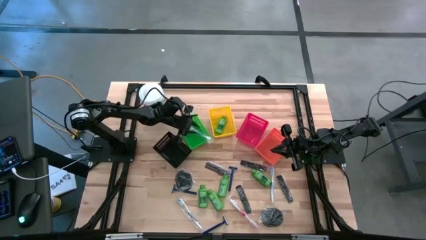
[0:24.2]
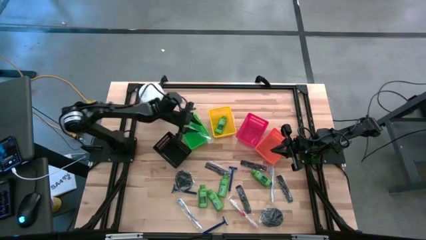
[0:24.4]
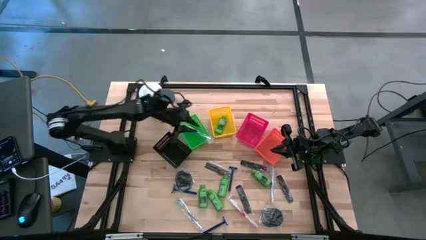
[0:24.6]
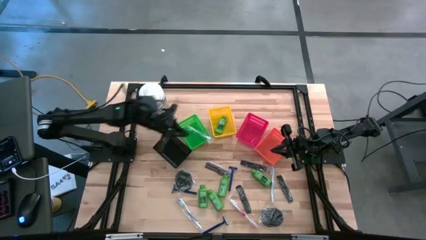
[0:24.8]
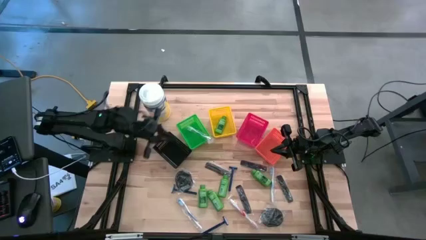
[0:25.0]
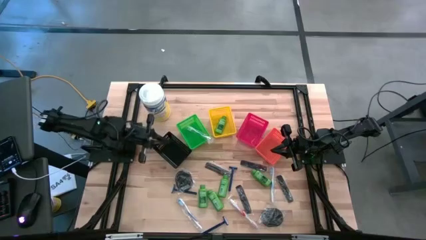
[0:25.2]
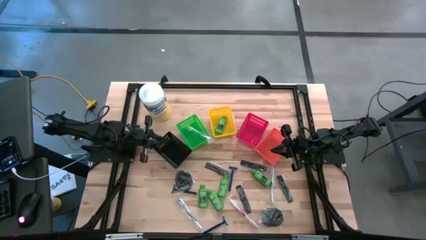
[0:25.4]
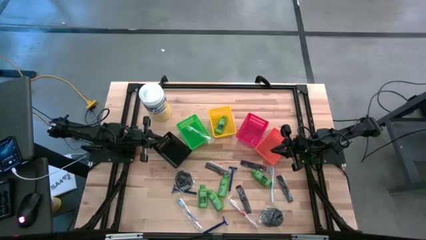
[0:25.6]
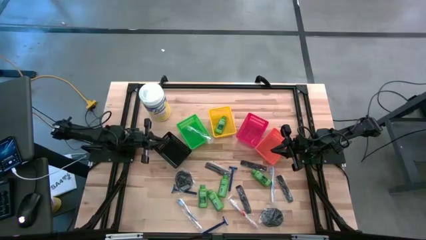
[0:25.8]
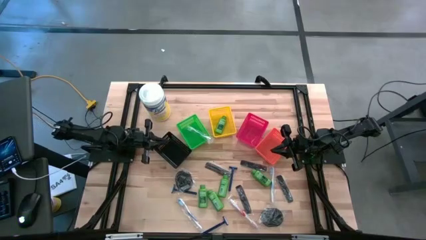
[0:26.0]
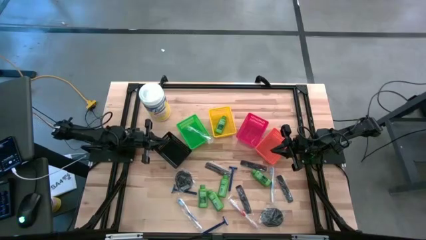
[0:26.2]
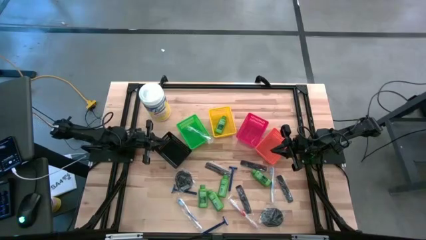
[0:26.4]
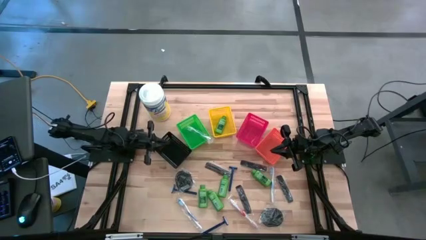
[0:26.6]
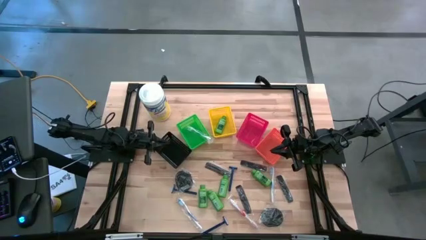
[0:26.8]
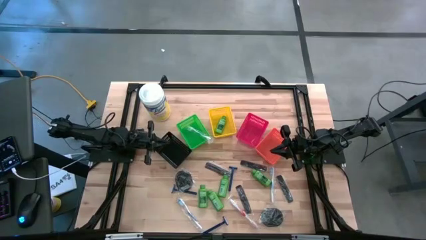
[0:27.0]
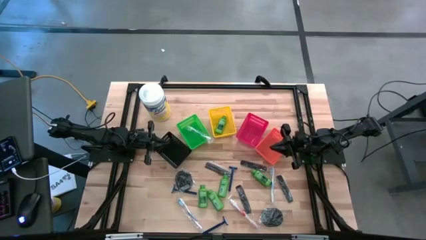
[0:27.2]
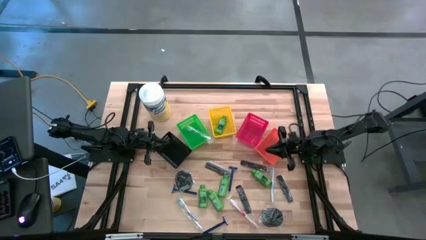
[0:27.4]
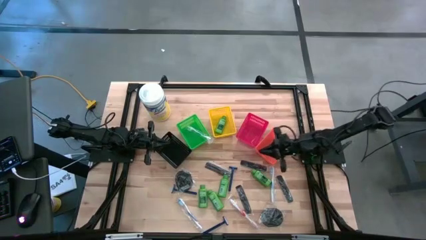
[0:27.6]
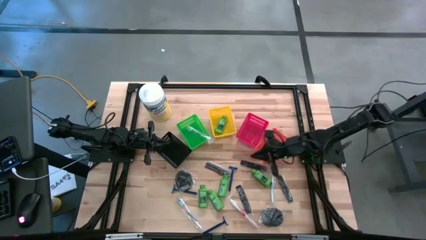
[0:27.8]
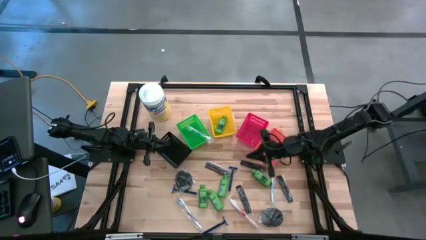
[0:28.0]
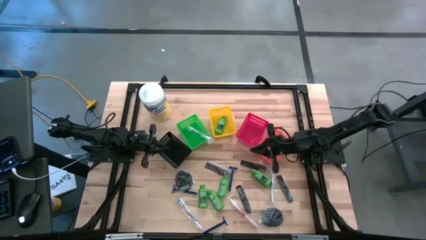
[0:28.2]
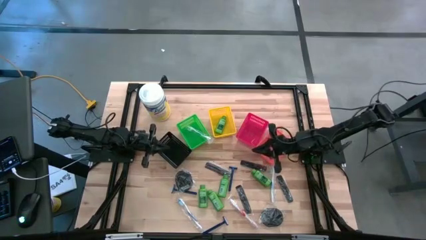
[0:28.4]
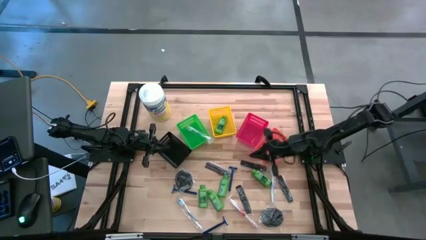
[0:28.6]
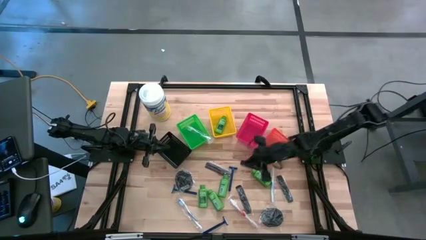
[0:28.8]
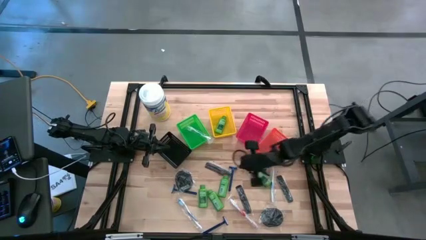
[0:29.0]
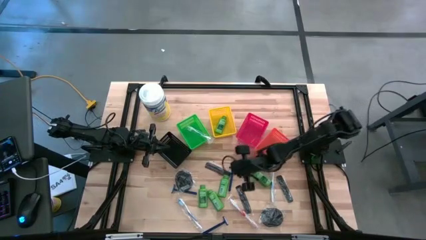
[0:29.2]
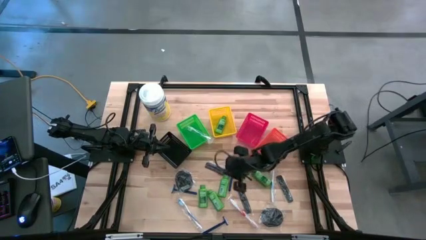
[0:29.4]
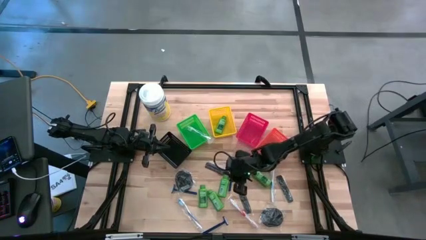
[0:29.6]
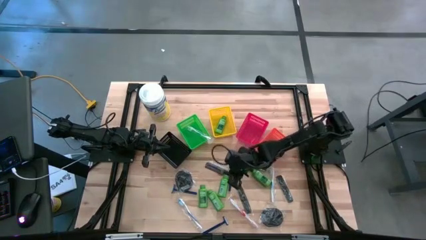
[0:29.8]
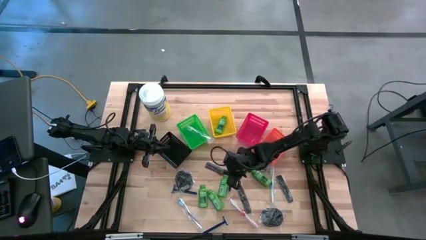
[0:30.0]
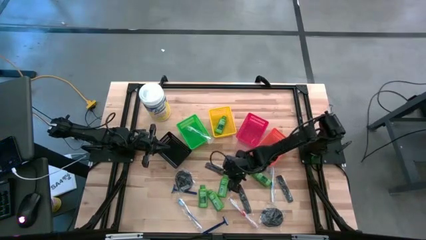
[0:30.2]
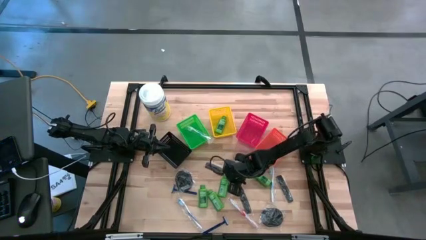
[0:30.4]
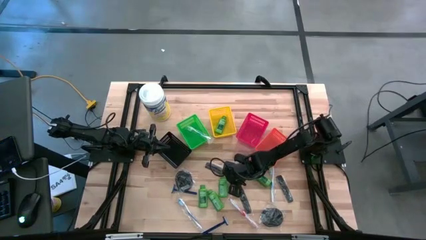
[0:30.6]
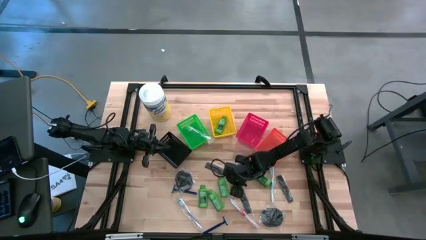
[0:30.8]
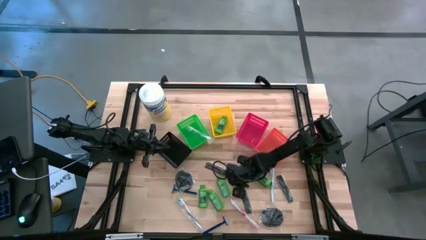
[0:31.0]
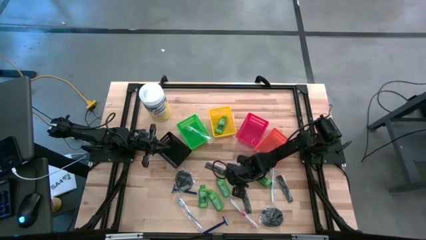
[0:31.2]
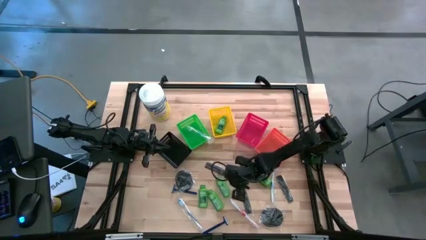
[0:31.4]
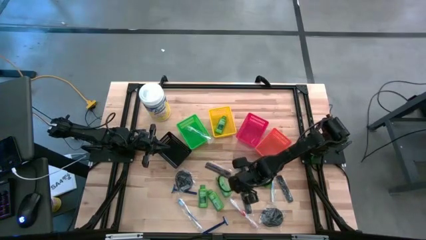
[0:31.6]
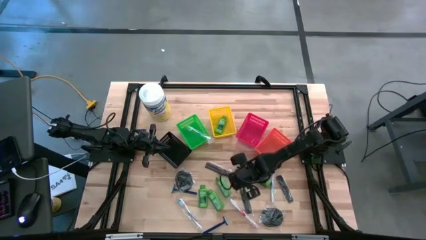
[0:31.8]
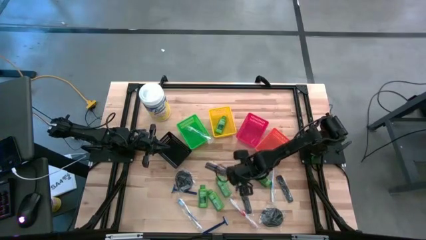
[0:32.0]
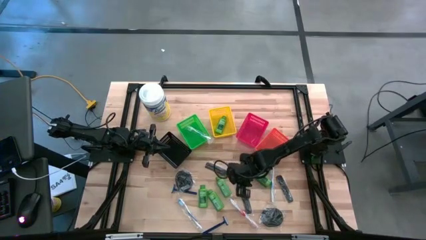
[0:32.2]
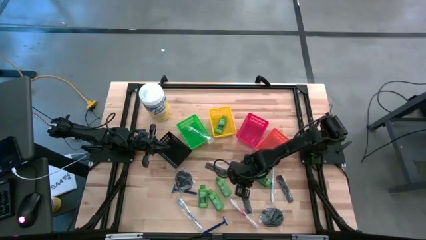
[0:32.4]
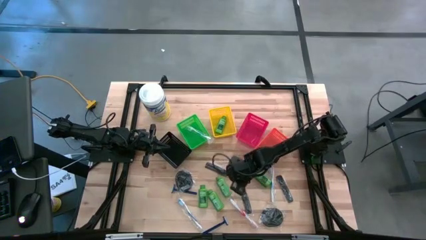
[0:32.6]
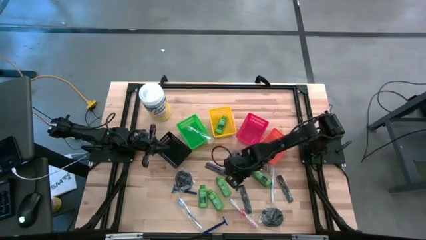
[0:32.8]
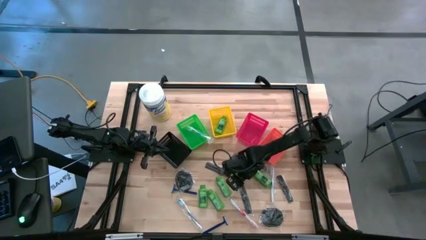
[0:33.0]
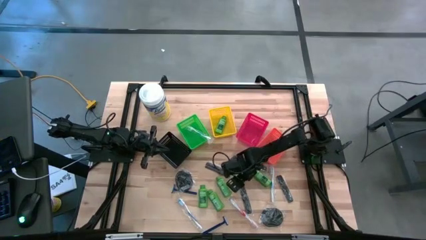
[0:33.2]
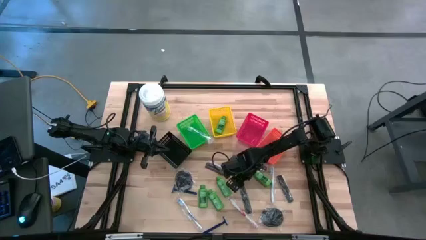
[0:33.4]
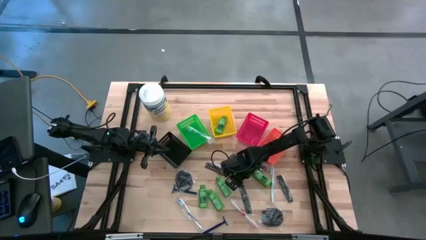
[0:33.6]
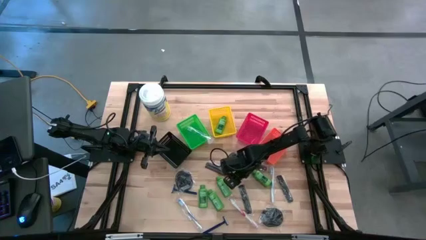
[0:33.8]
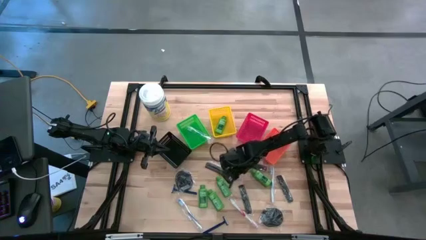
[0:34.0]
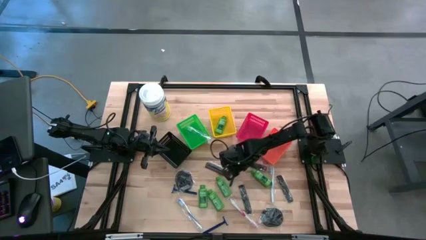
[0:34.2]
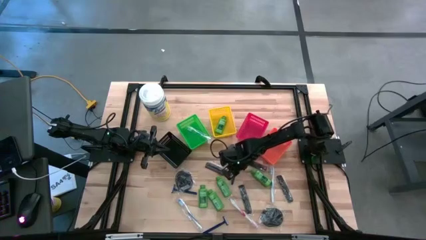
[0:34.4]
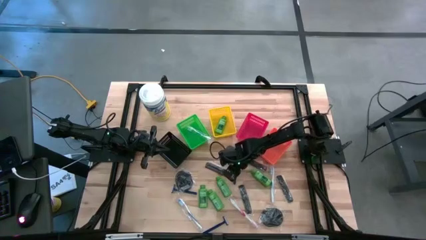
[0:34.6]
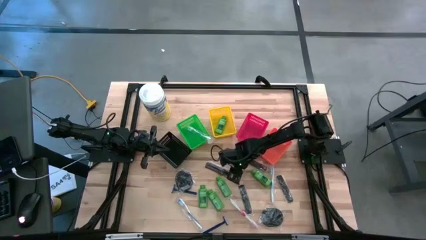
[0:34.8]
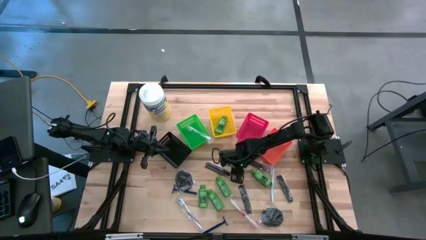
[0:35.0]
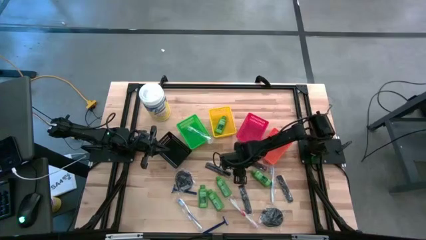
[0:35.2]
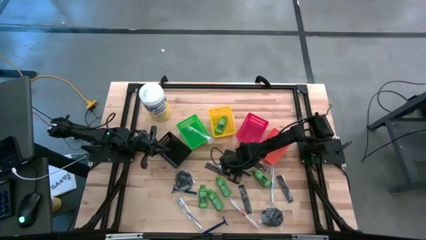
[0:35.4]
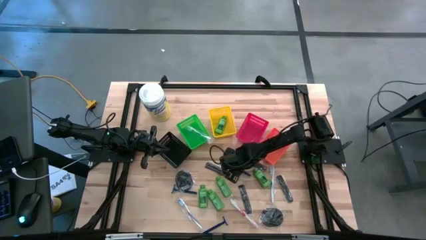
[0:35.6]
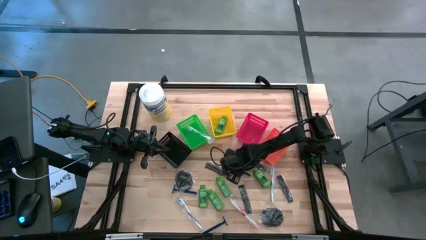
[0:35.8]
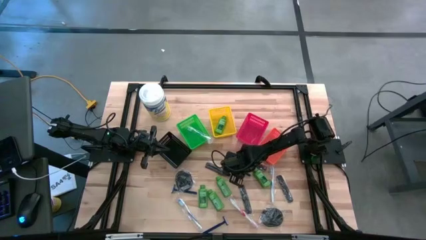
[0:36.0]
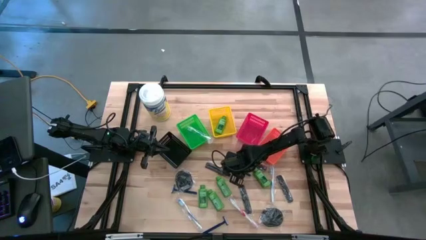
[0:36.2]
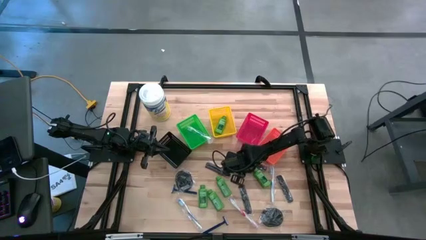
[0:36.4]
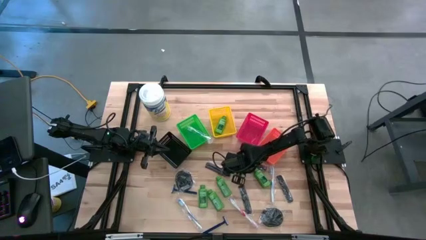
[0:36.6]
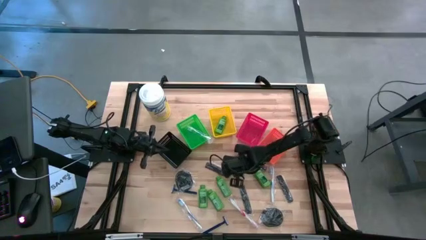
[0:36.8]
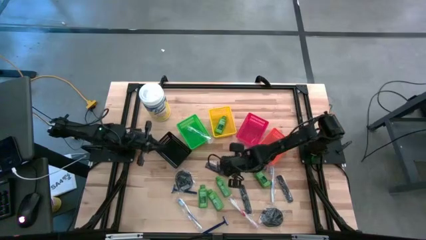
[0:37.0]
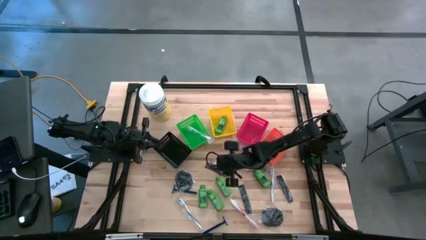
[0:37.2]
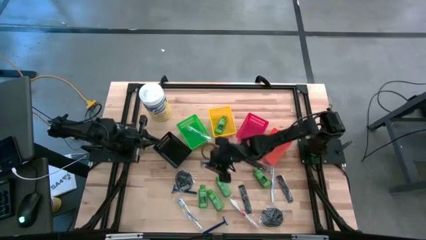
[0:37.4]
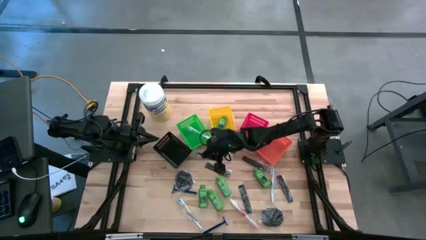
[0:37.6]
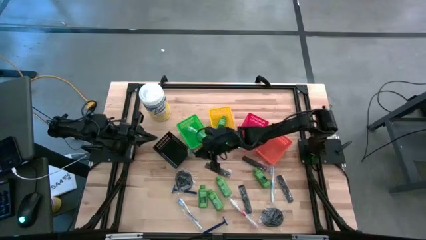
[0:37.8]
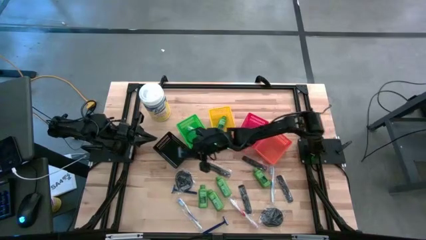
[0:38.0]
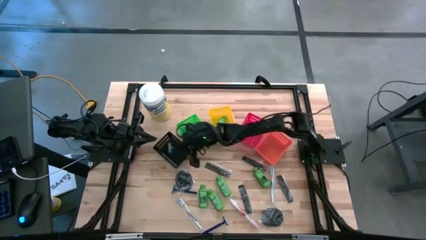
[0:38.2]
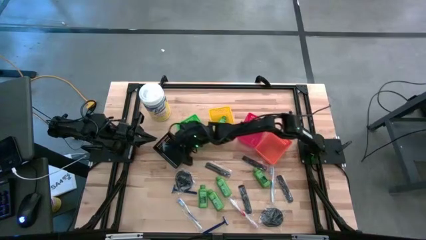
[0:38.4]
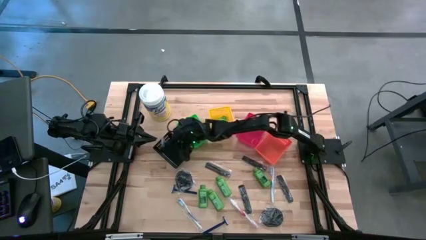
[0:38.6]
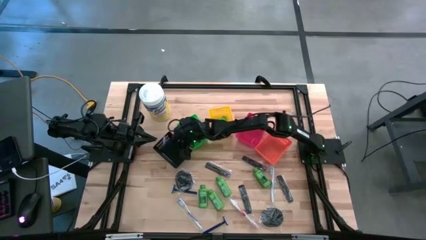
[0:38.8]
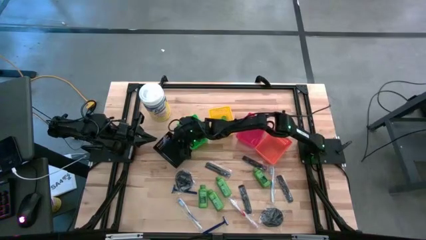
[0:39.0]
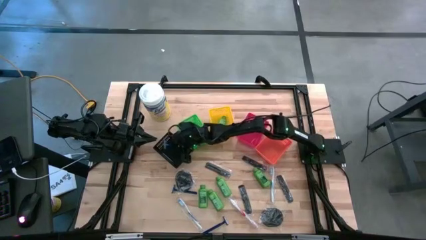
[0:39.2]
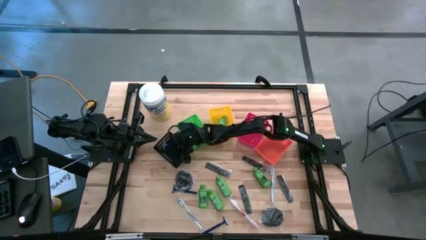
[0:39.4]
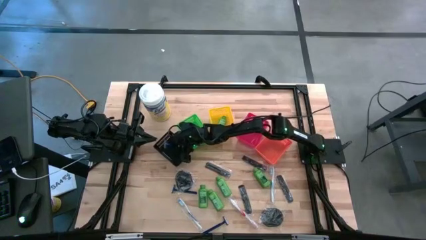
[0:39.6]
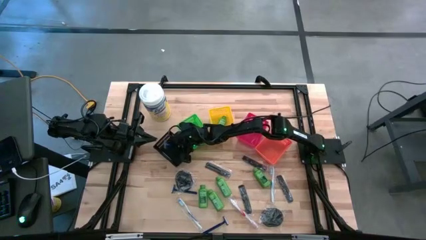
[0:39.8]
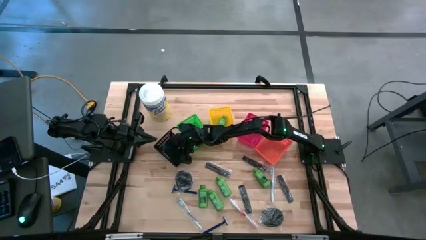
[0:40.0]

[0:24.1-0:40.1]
Task: Pick & Place Travel size toiletries
Put the blue razor into the black bin
